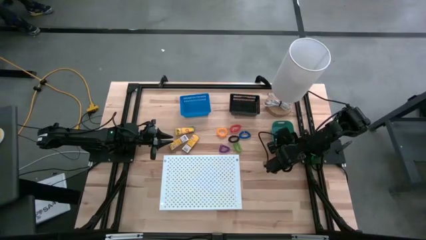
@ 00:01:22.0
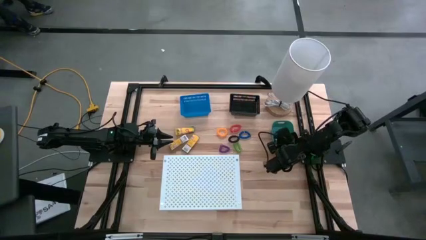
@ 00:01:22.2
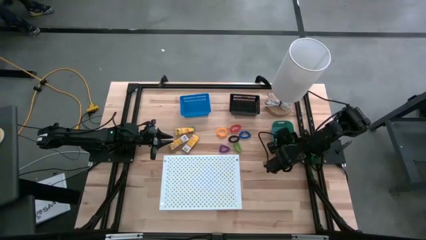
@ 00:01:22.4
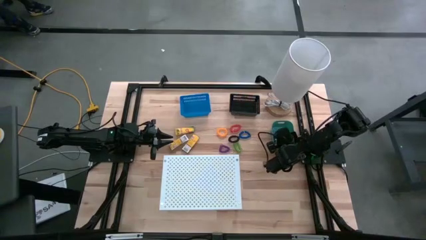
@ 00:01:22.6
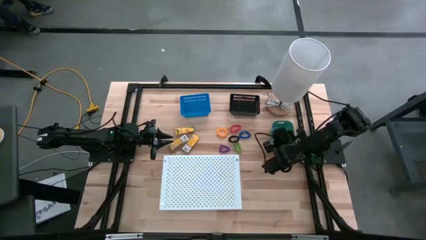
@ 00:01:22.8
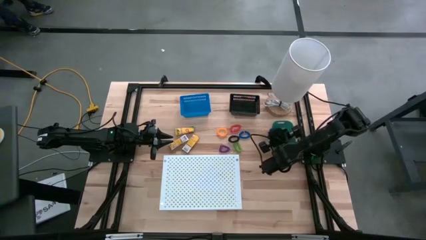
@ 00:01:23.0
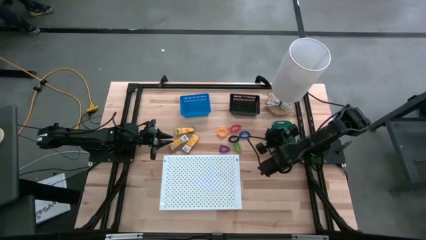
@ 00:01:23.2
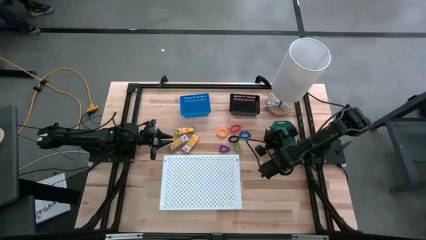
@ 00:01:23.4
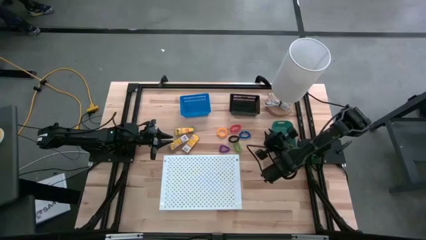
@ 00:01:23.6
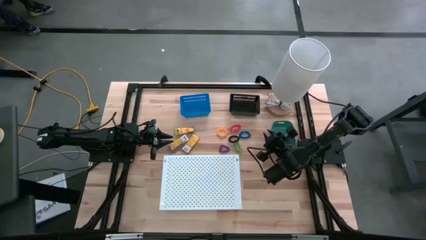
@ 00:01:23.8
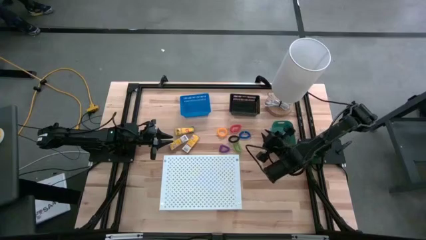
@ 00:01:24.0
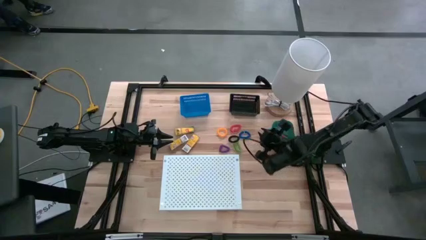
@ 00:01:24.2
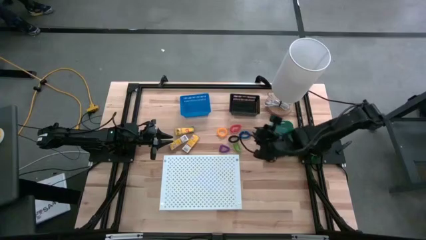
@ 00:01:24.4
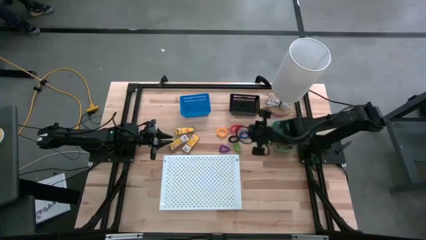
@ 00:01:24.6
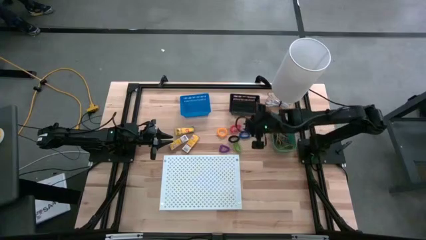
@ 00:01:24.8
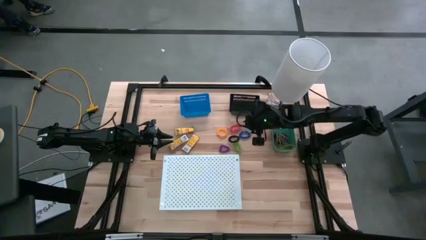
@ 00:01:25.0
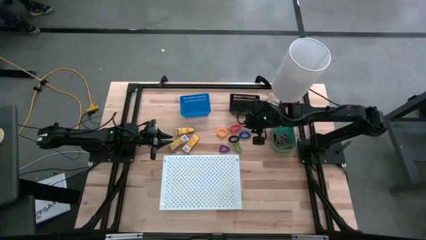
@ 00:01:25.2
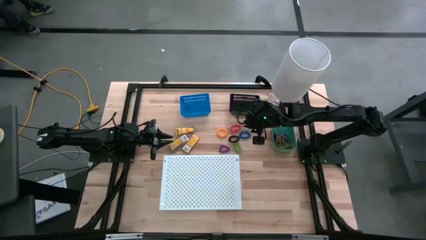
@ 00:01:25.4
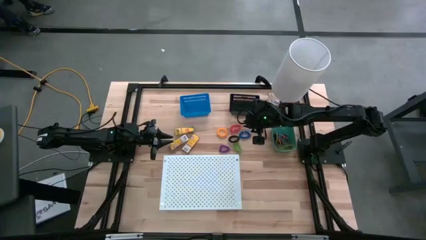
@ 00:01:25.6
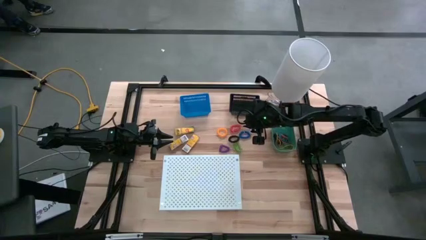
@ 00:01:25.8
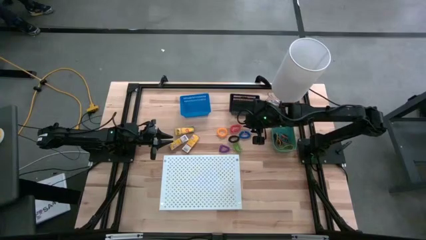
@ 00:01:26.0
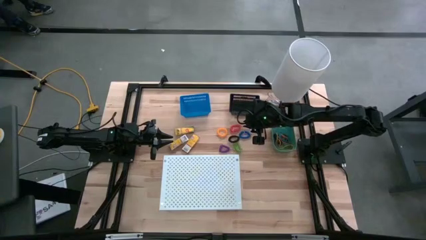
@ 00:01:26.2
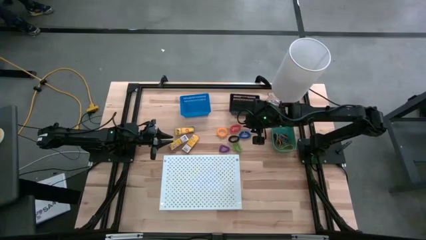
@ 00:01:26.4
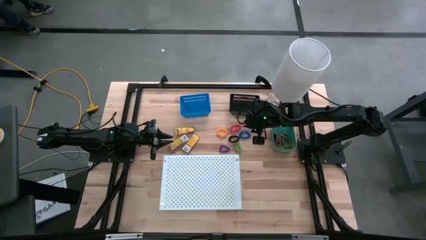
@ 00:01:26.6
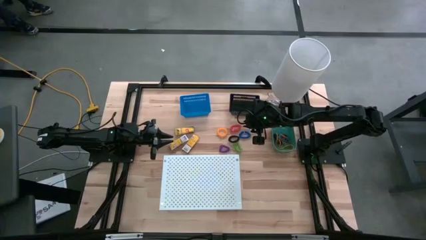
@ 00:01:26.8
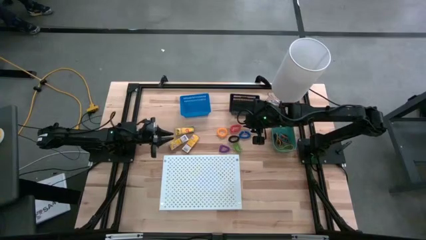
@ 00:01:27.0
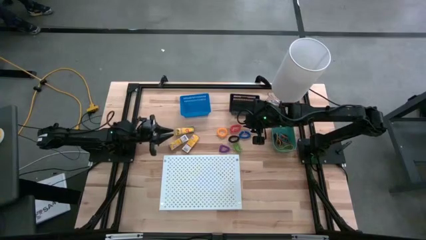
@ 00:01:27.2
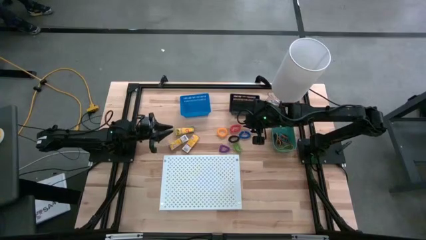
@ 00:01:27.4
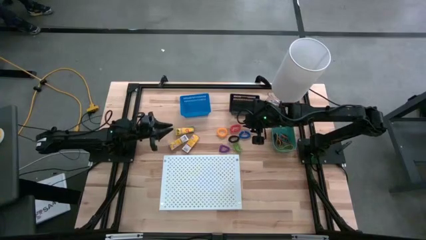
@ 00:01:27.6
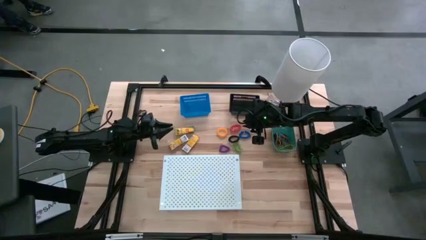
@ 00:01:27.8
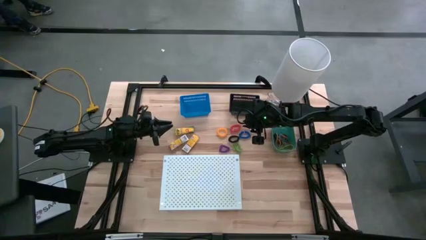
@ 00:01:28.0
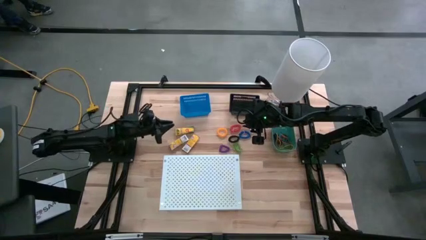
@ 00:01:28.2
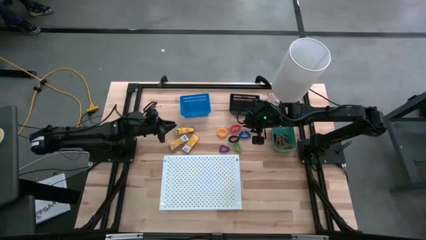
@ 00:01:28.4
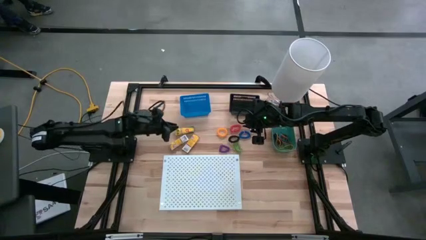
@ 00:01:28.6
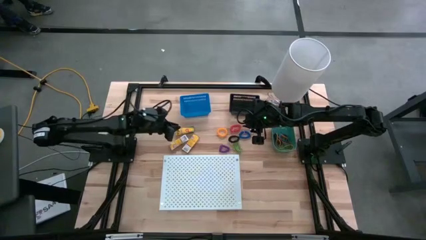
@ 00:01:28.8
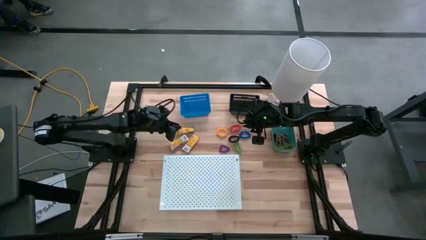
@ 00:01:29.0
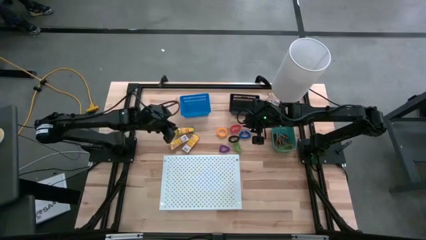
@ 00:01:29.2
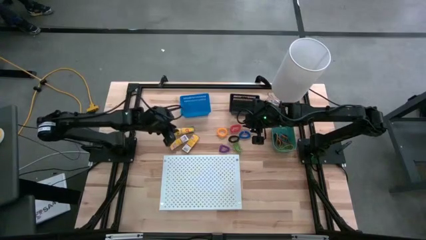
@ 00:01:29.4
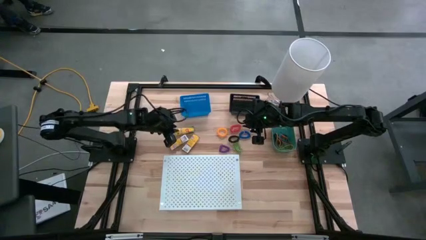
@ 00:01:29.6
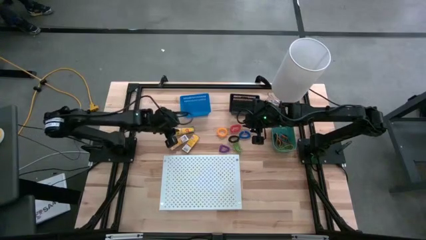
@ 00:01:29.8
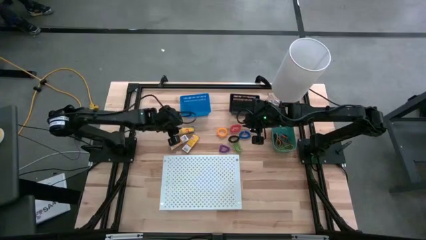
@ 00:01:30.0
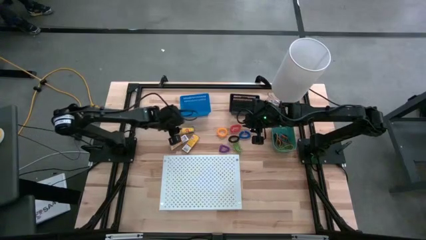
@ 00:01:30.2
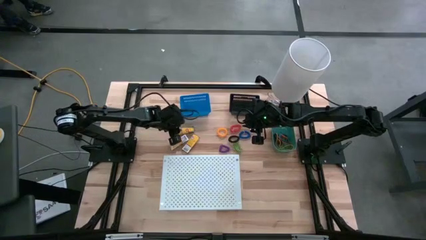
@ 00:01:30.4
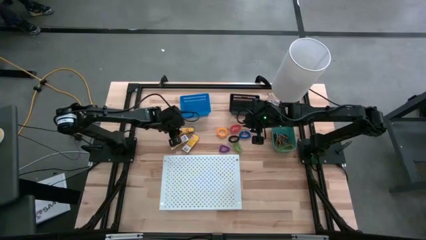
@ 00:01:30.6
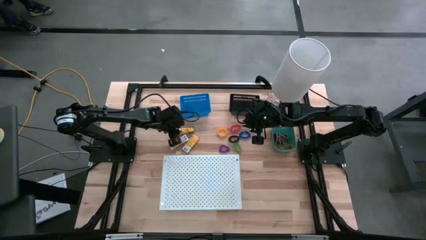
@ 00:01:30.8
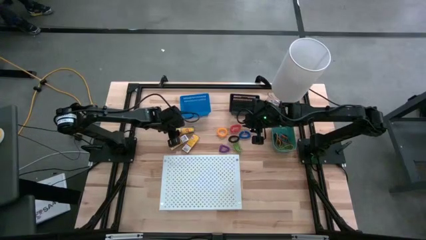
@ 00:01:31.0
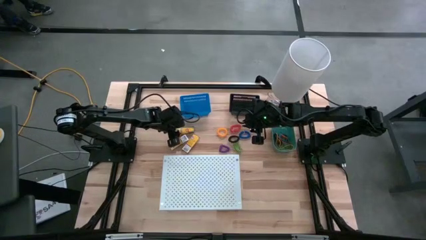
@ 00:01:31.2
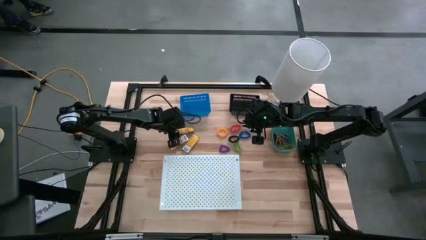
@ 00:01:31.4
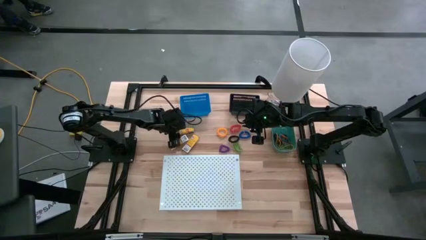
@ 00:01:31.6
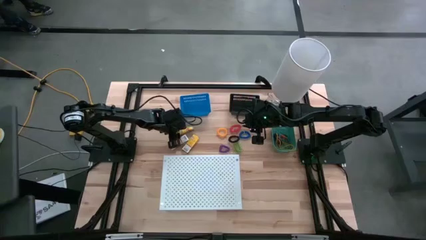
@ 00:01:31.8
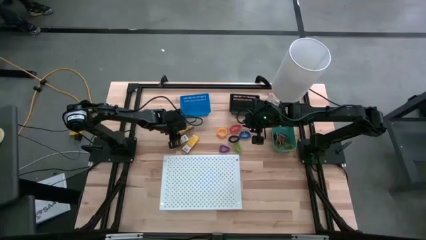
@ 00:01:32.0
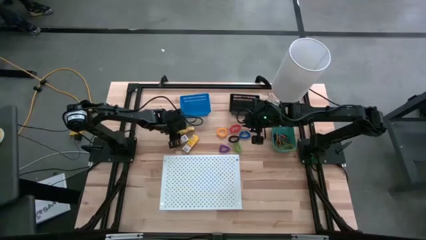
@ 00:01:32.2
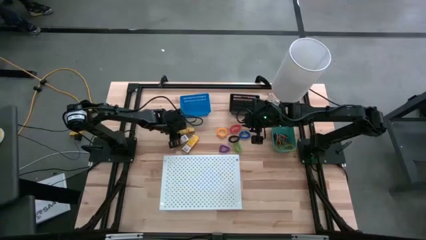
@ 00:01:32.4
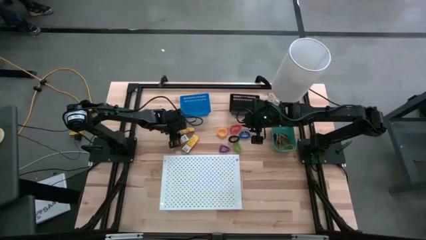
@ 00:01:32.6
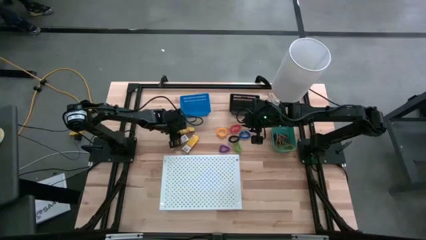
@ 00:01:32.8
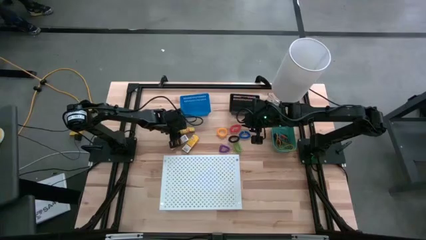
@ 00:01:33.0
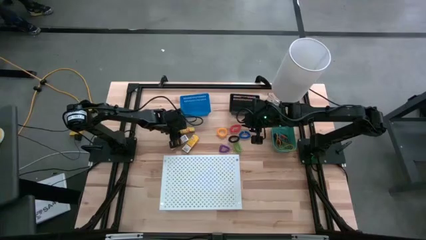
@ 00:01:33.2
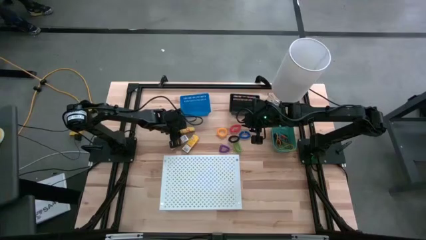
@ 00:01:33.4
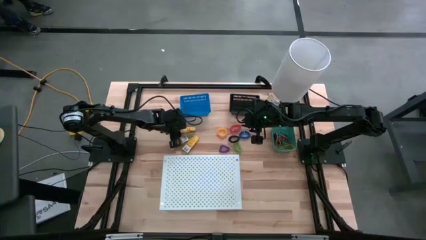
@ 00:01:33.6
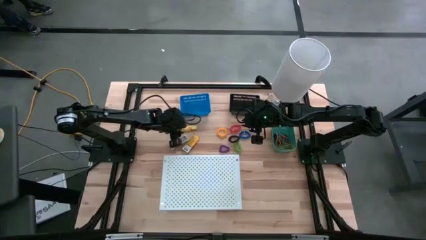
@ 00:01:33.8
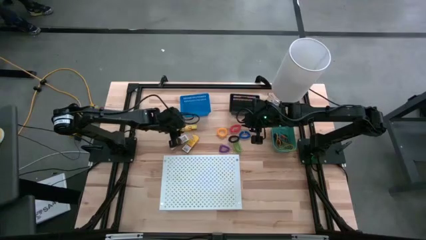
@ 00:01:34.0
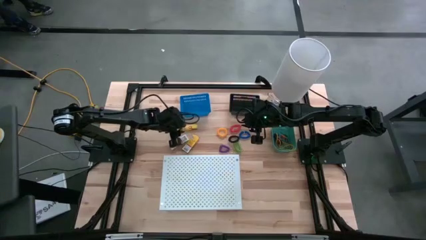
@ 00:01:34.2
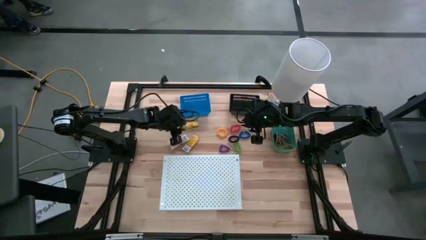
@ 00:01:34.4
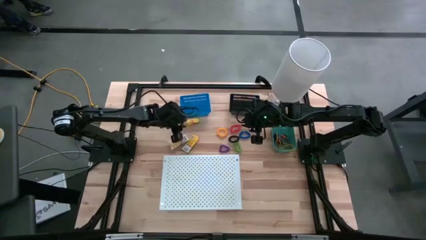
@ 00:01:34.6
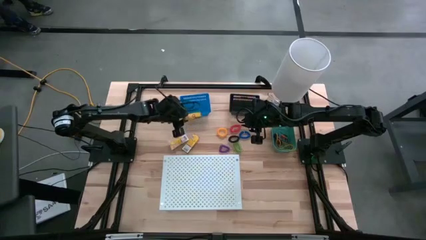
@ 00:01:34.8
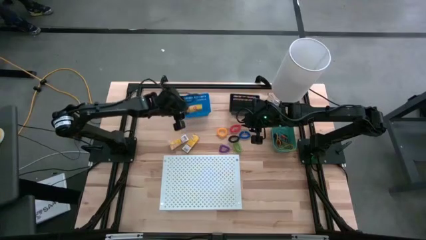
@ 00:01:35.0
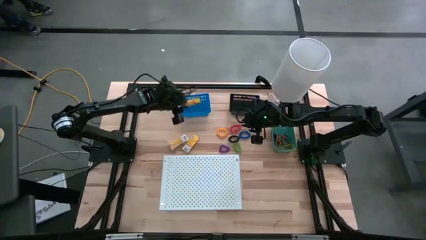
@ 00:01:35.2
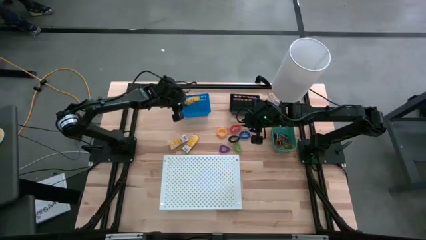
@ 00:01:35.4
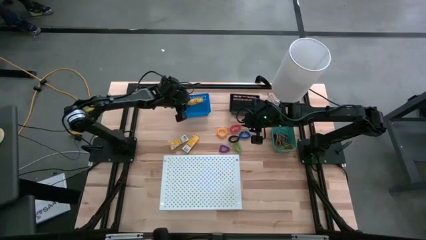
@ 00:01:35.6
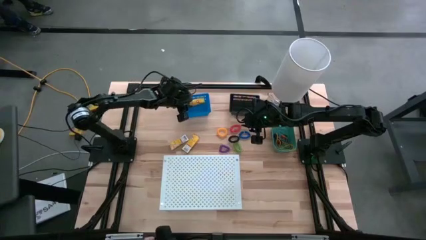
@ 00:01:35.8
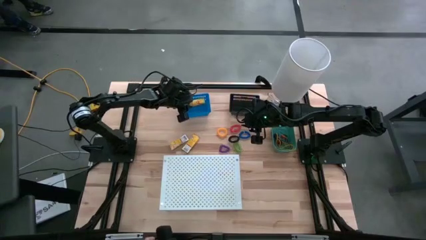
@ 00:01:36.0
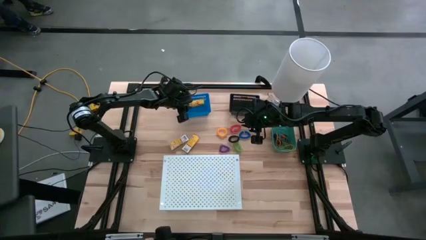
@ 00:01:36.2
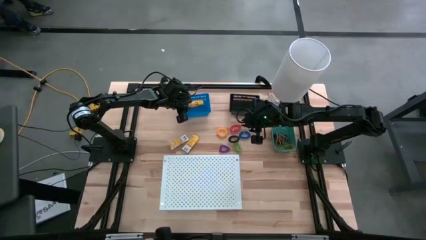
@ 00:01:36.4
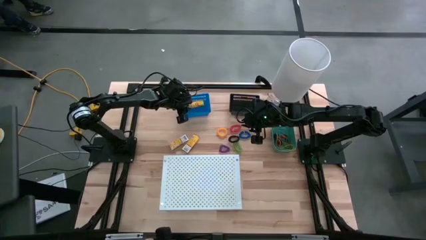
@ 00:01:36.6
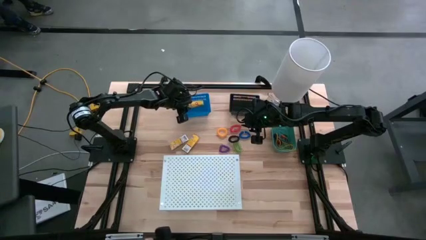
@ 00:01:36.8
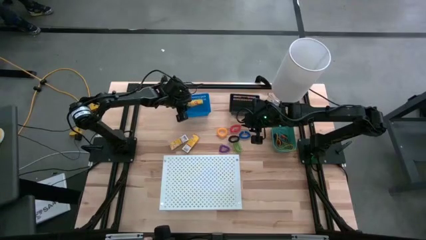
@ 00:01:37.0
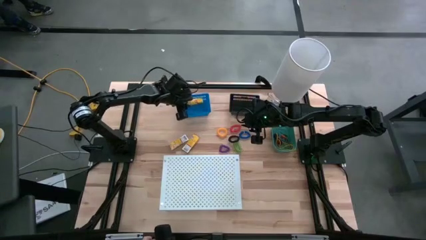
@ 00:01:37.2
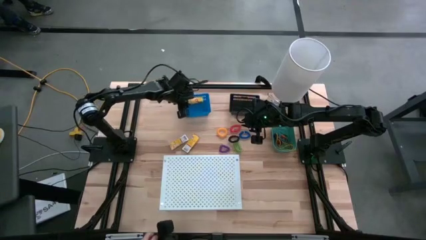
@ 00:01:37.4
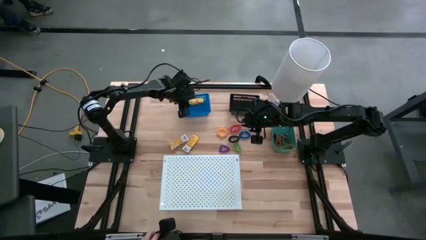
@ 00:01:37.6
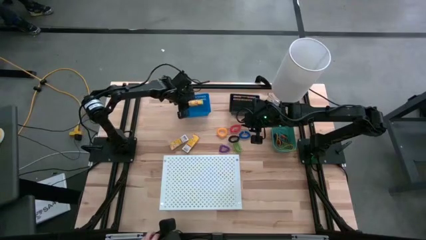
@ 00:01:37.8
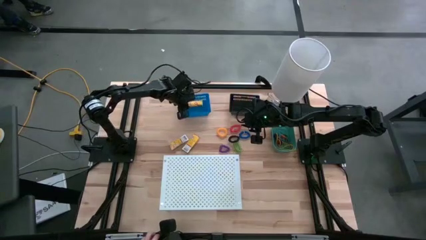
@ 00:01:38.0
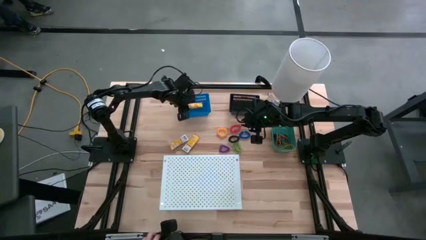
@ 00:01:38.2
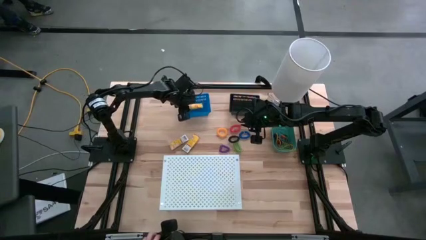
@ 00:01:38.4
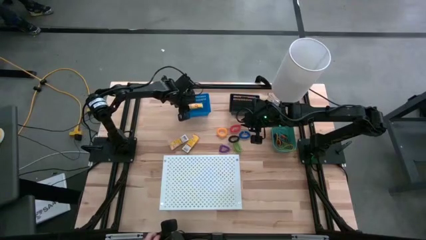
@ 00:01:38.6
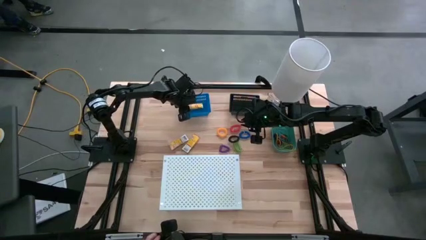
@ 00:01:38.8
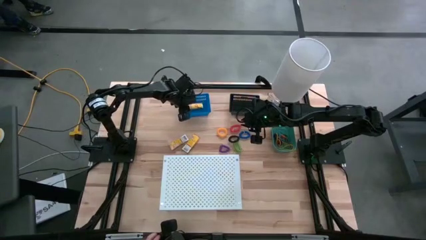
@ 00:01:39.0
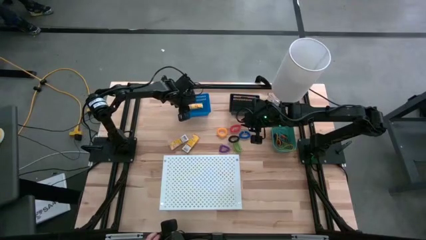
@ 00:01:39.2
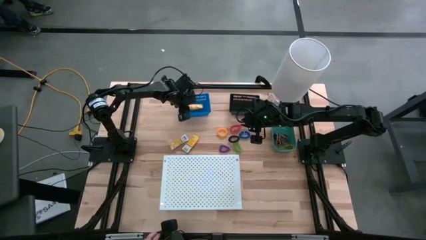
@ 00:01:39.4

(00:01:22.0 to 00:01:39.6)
Task: Pick & Place Office Desk Supplies
Put the top crayon box into the blue bin
